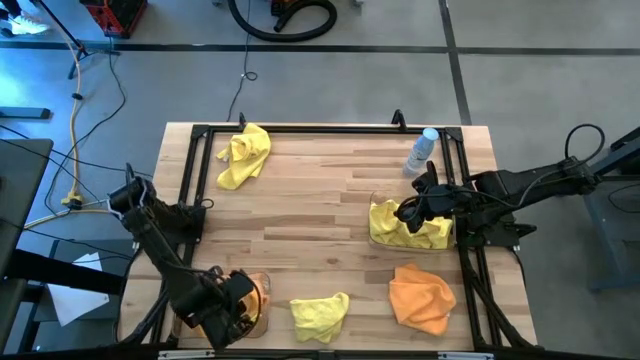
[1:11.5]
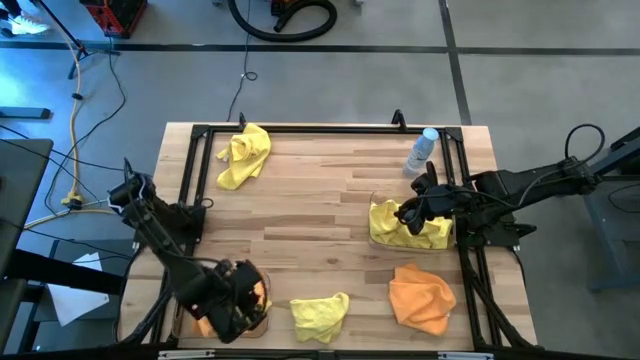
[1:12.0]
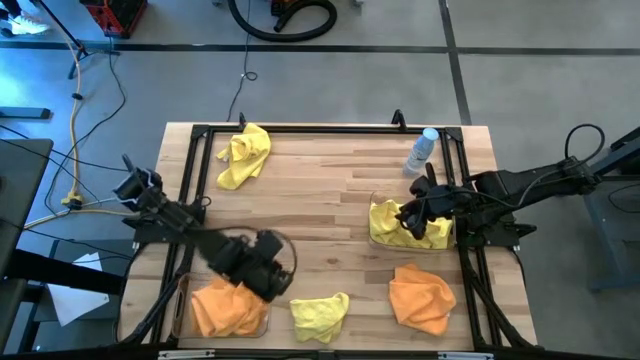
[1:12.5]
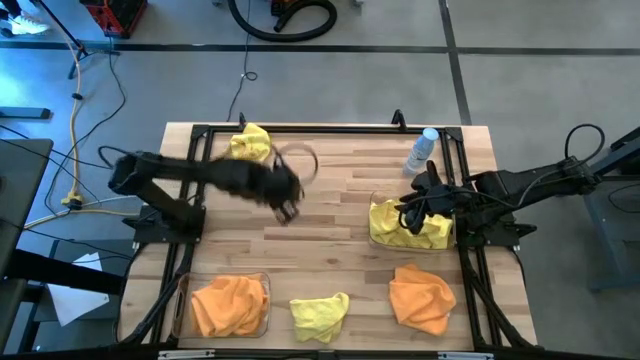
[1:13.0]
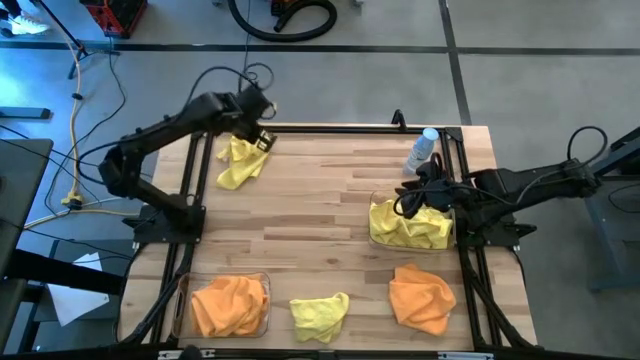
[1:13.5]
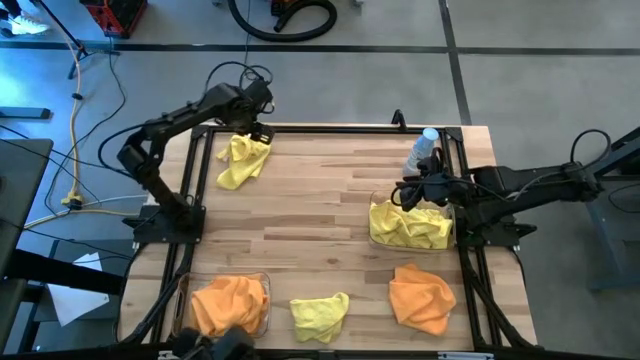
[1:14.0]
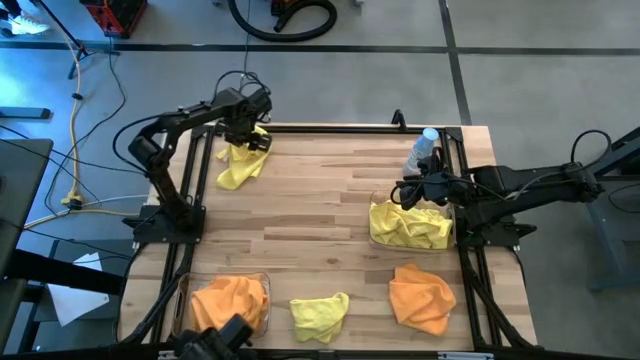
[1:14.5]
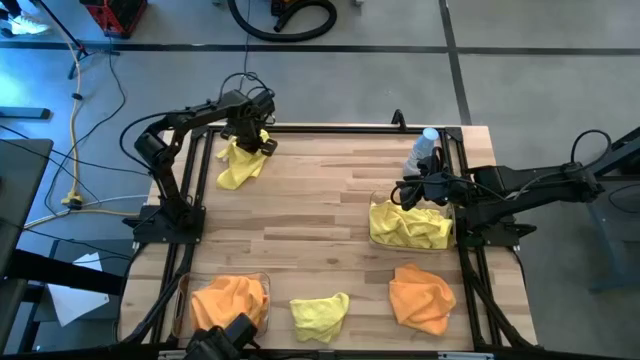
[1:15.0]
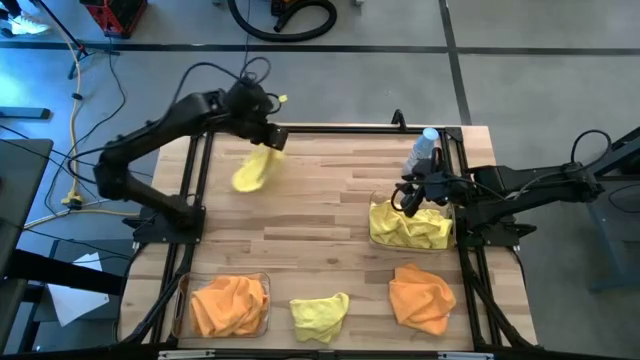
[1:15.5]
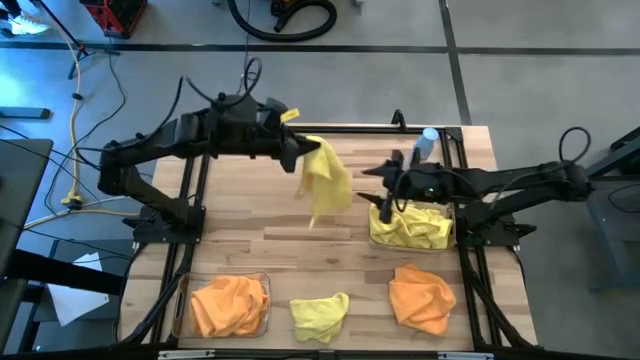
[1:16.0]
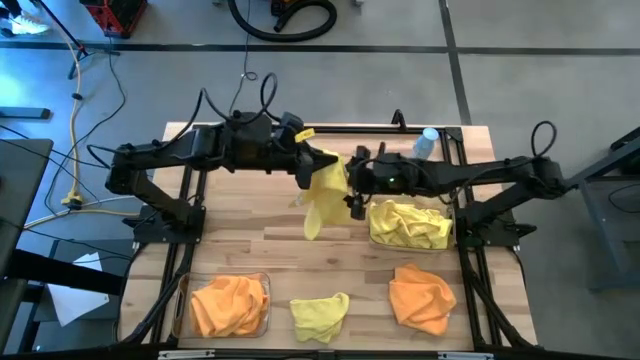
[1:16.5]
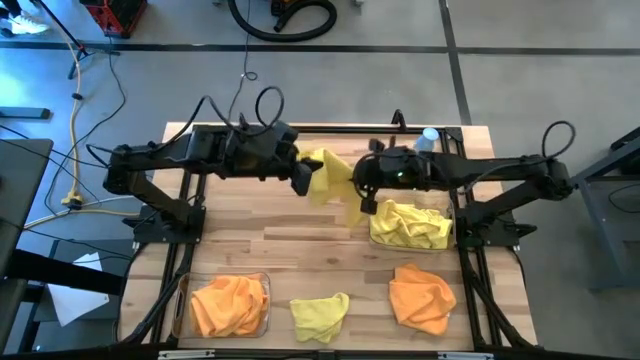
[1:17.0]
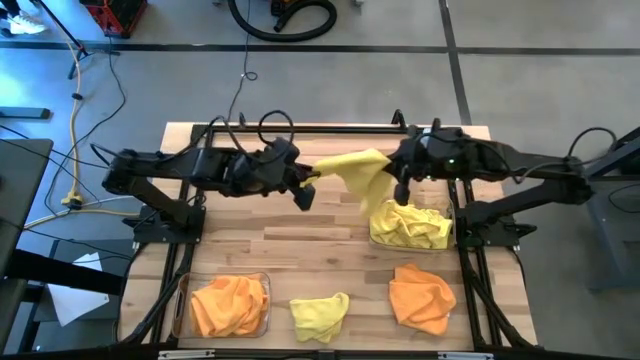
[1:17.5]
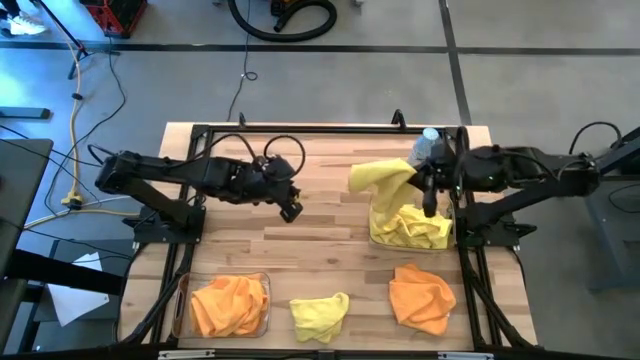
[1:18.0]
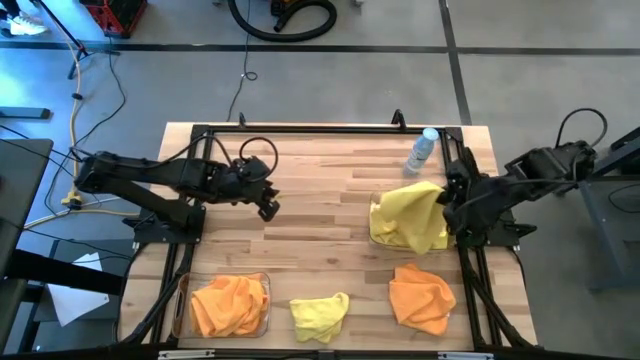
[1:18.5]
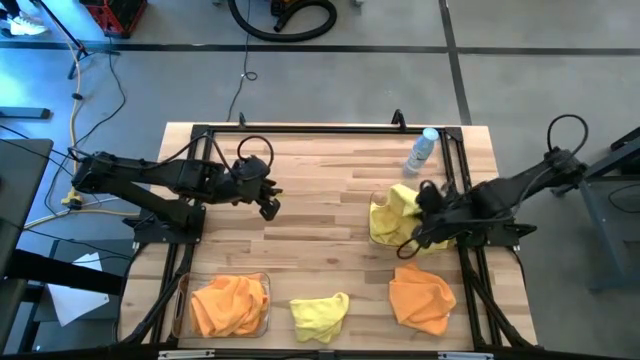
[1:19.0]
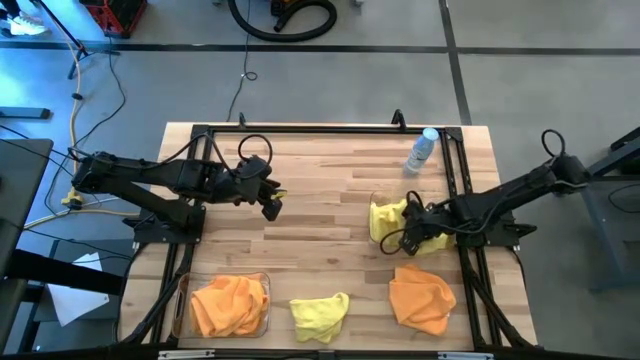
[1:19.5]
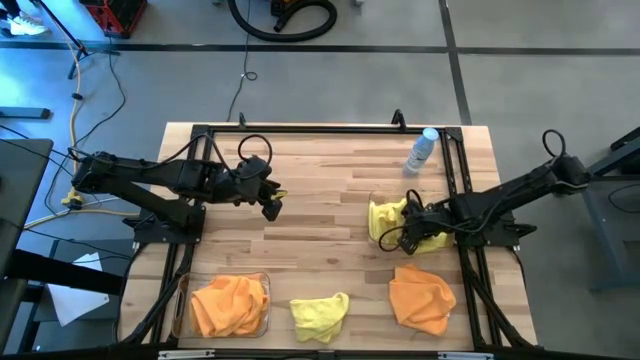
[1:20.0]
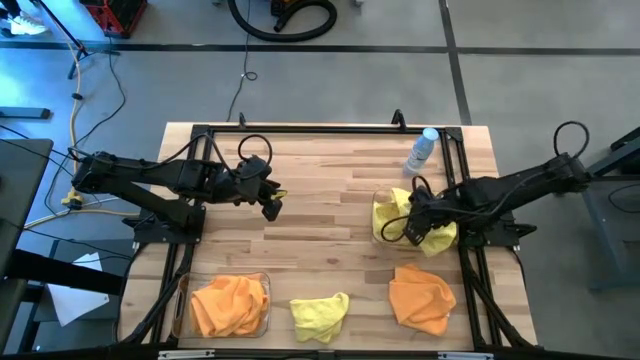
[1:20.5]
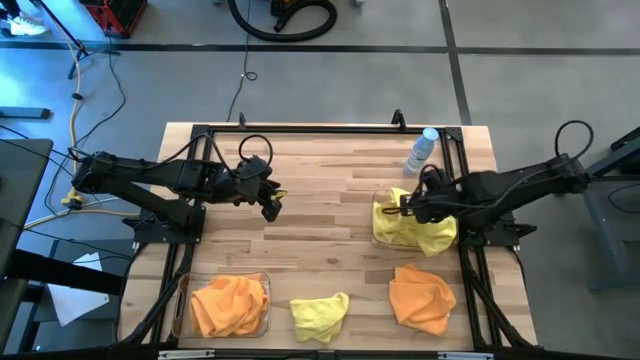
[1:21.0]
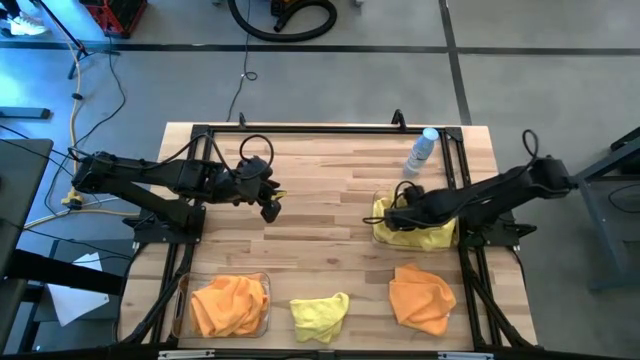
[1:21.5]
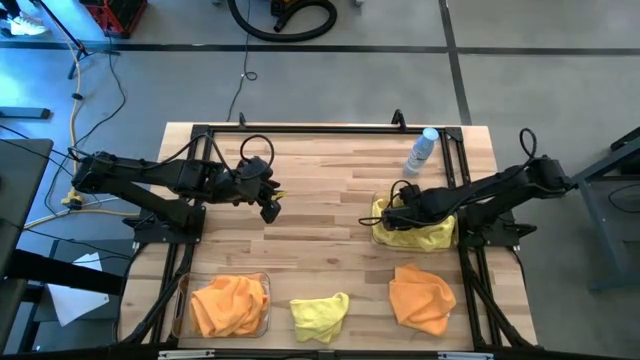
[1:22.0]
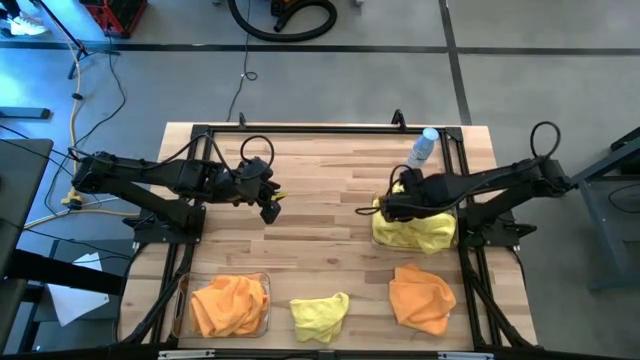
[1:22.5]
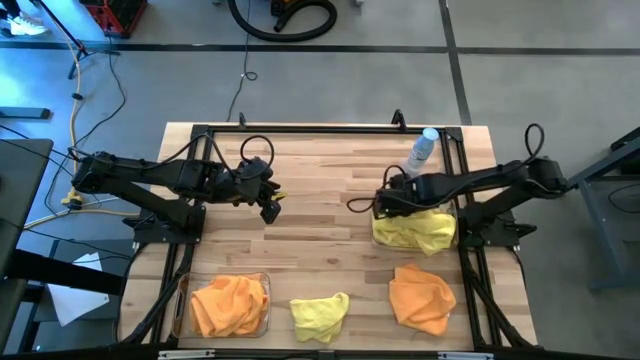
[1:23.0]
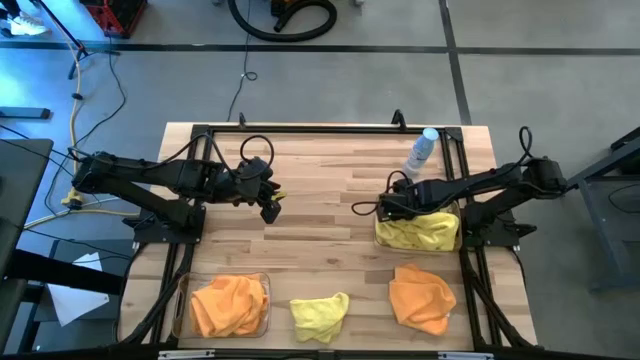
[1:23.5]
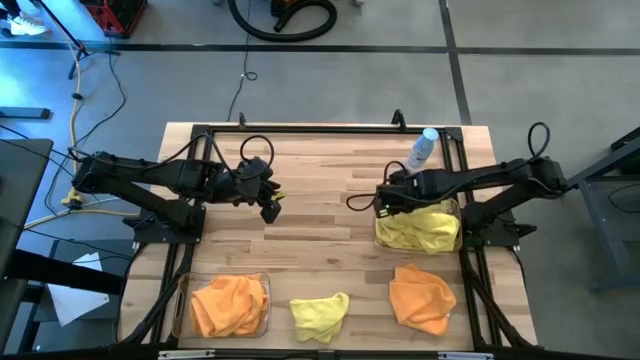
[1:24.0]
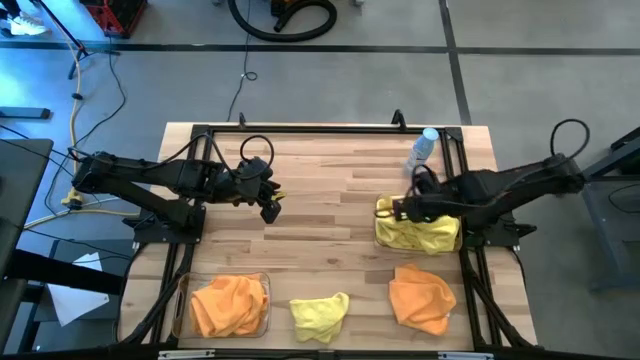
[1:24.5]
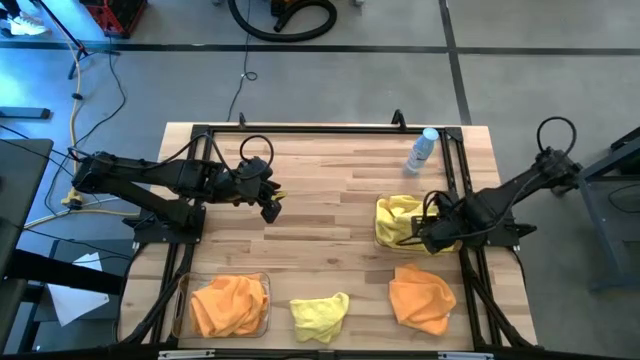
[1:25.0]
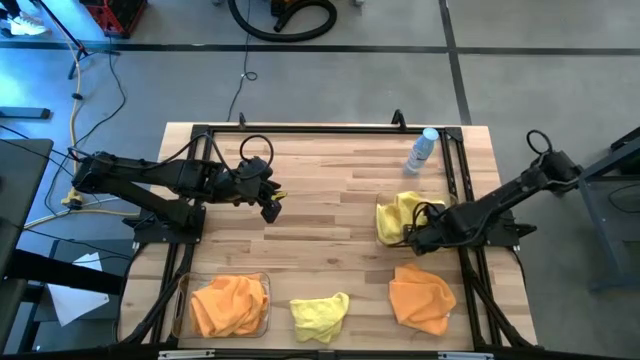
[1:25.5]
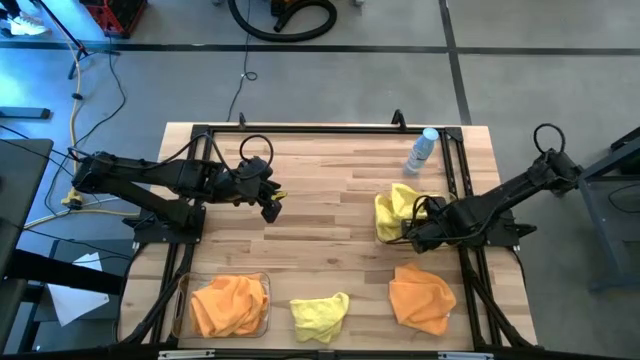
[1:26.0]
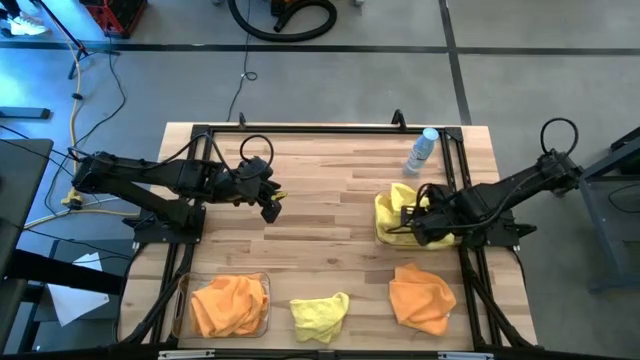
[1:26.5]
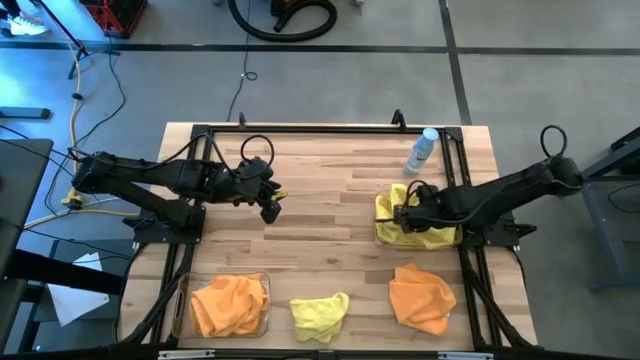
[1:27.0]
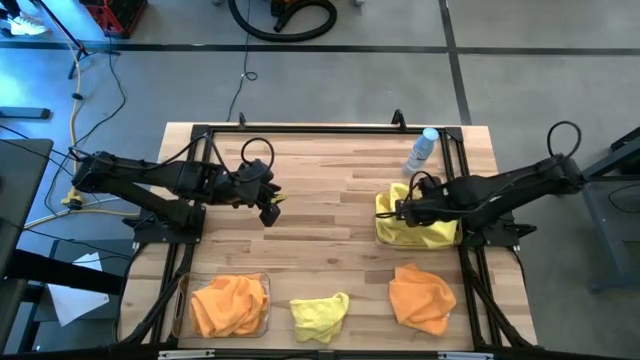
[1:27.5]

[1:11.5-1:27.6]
Task: Sort microfiber towel by color & place in baskets
Put the yellow microfiber cloth into the right transparent bin

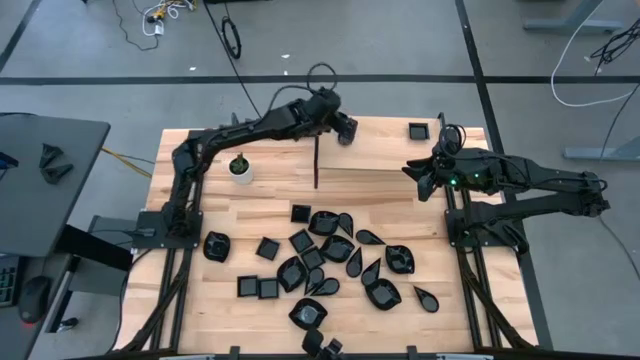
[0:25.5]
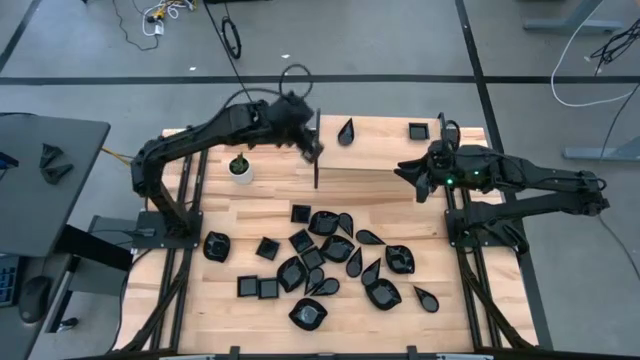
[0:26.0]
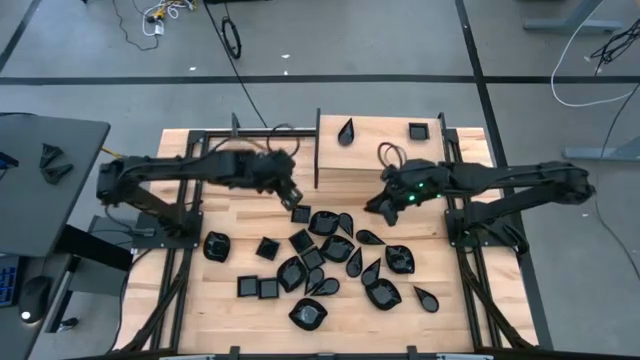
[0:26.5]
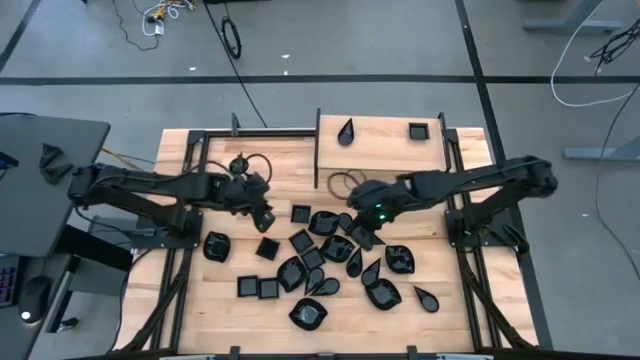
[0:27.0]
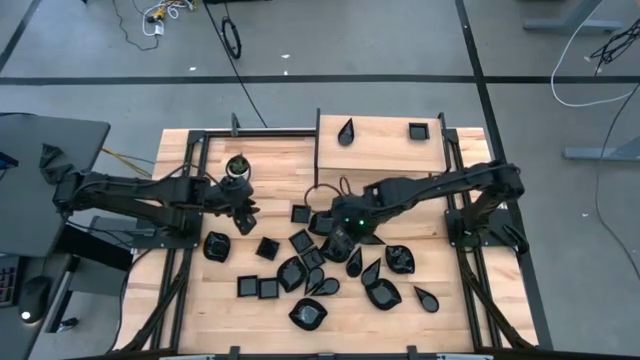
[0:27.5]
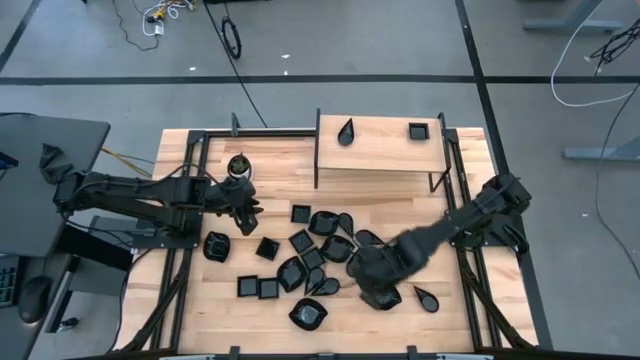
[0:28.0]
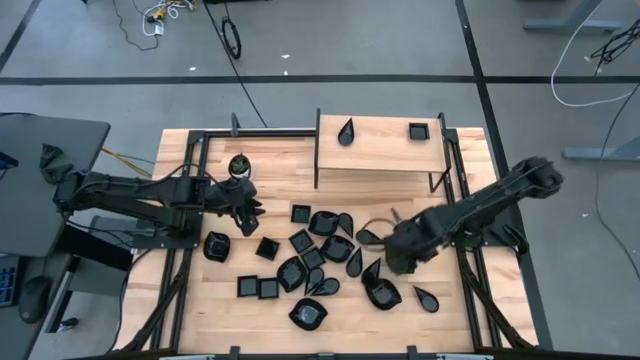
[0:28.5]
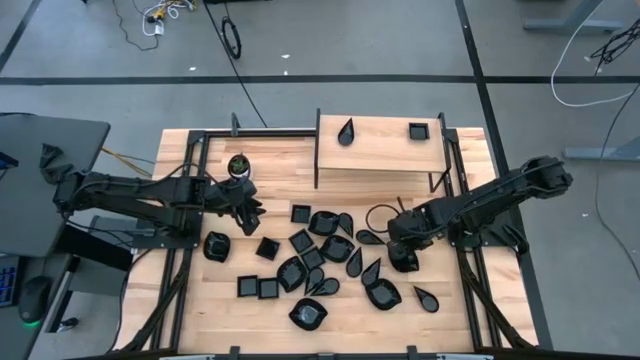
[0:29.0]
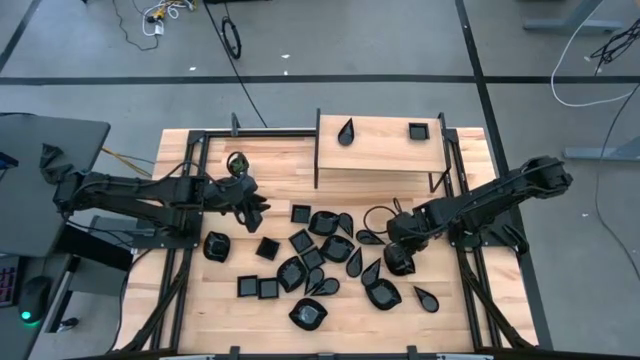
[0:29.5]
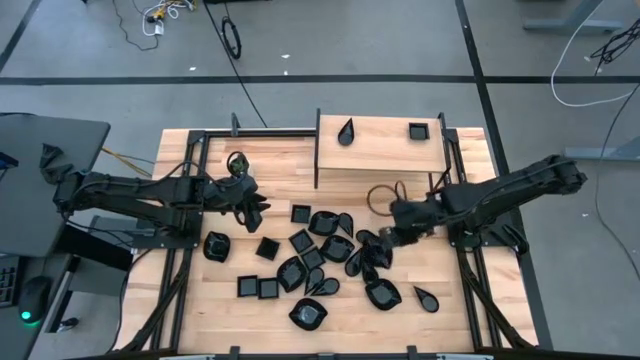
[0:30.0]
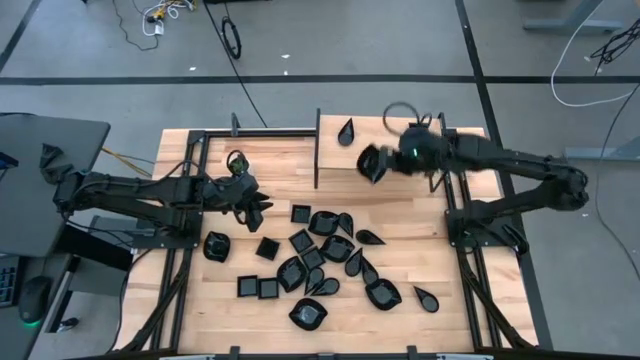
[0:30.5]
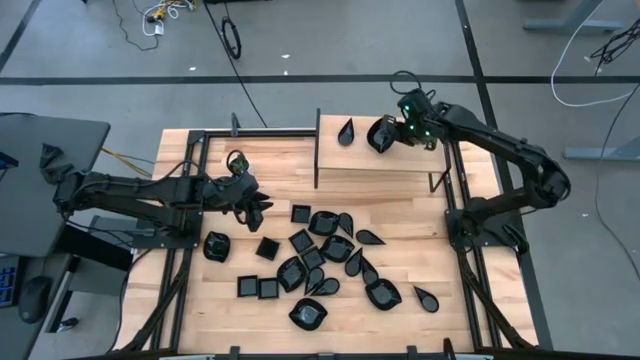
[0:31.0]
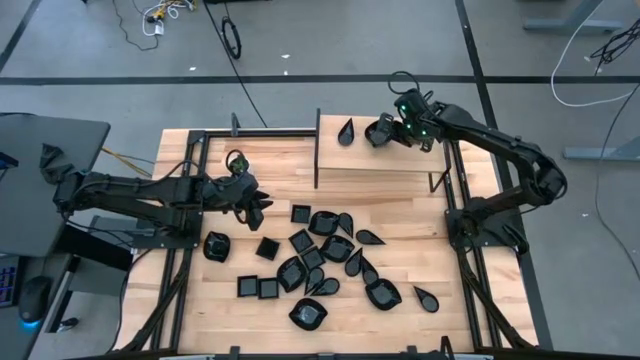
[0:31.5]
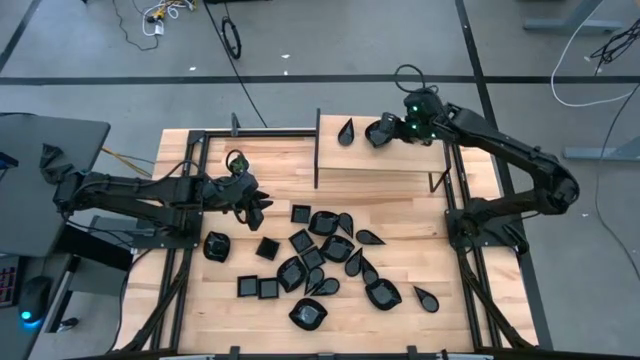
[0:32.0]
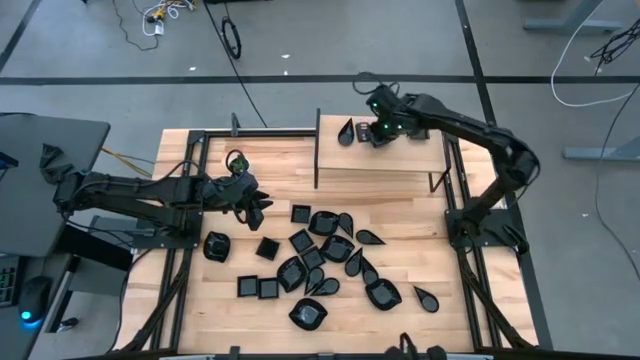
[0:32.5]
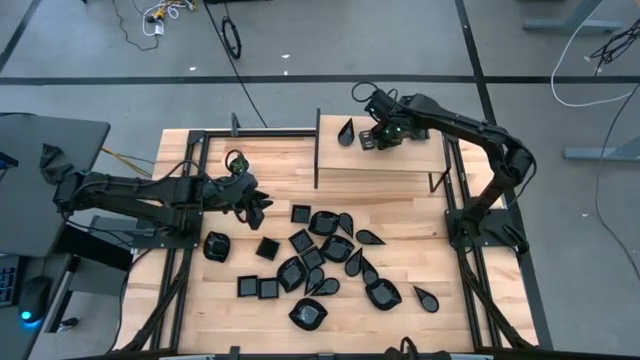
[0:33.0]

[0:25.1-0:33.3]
Task: Pick & Place Mini shaped plates
Put the leaf-shaped plate on the shelf
